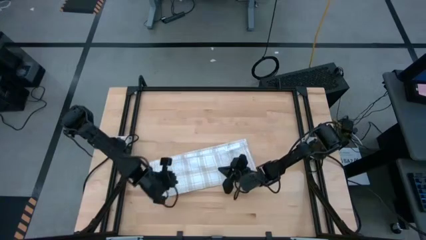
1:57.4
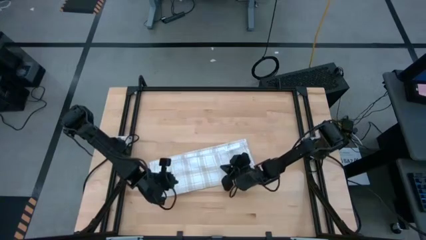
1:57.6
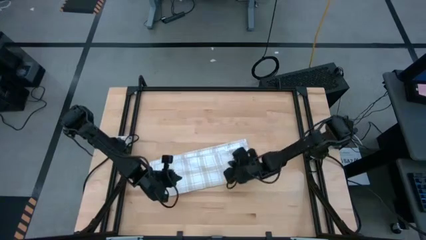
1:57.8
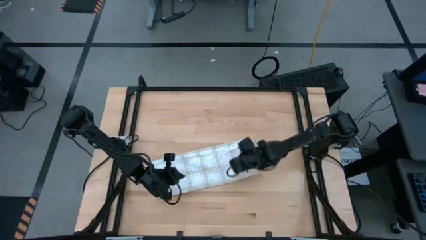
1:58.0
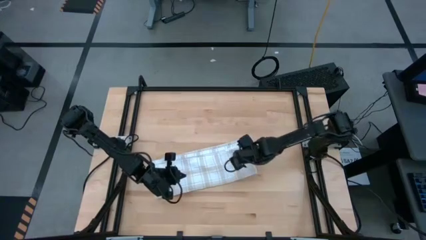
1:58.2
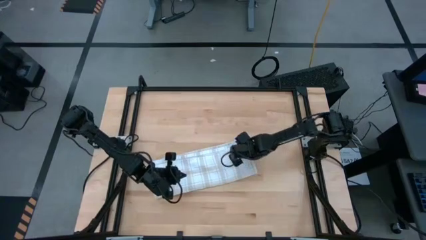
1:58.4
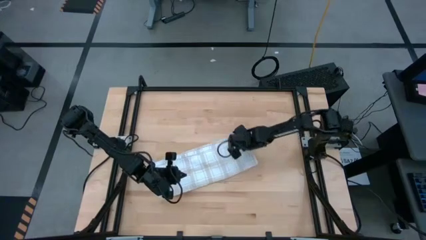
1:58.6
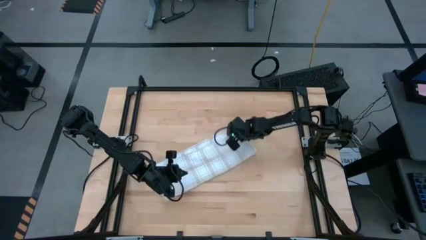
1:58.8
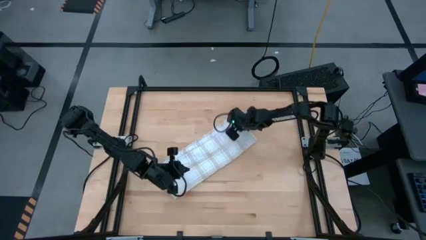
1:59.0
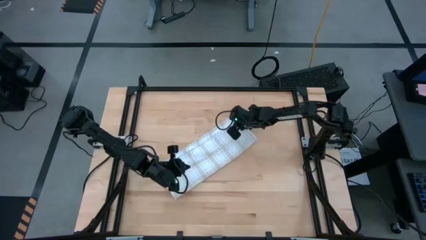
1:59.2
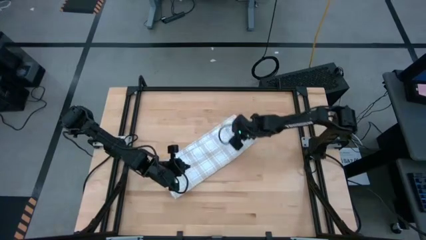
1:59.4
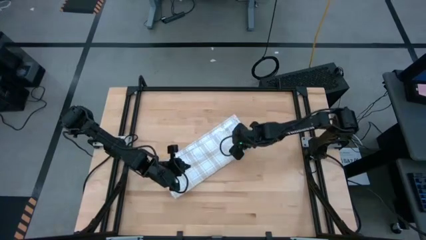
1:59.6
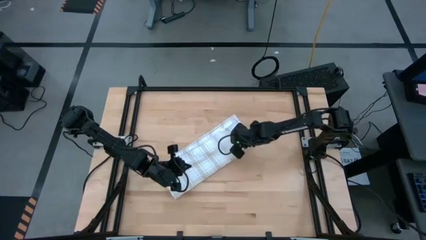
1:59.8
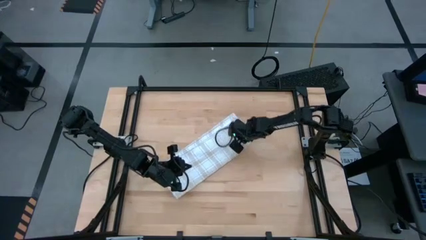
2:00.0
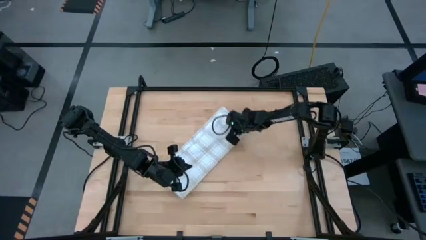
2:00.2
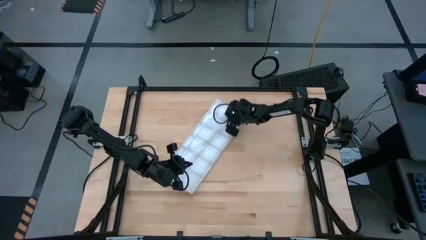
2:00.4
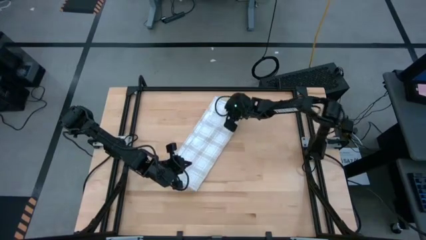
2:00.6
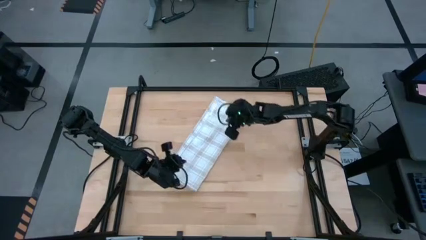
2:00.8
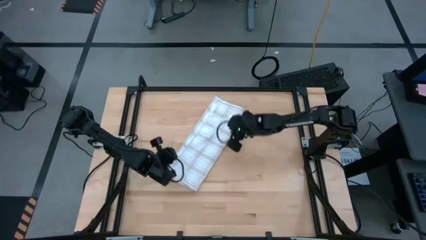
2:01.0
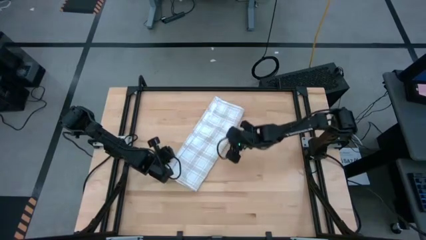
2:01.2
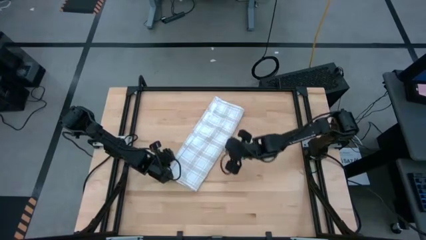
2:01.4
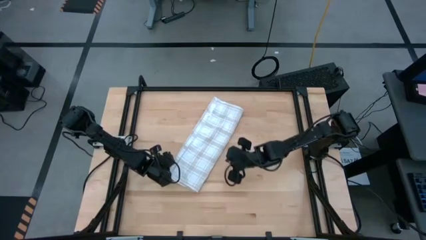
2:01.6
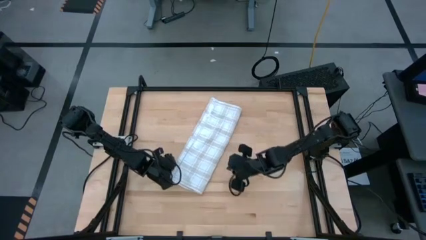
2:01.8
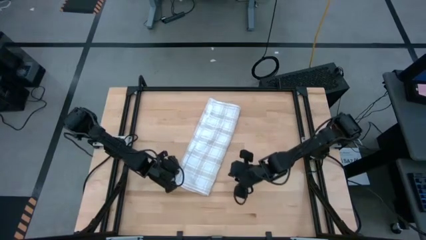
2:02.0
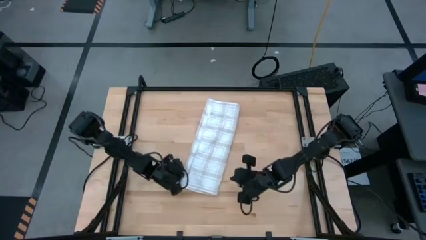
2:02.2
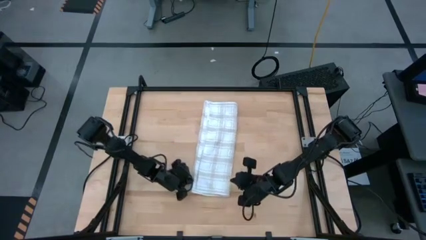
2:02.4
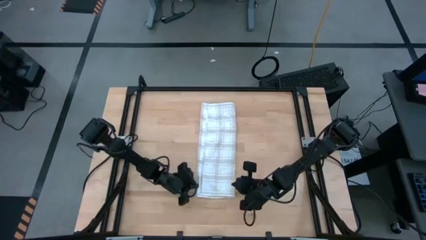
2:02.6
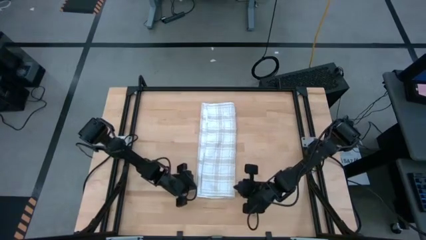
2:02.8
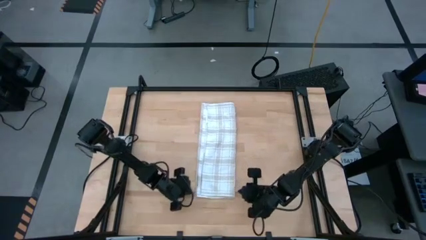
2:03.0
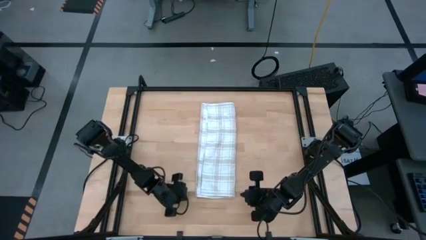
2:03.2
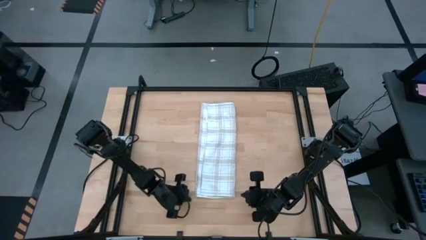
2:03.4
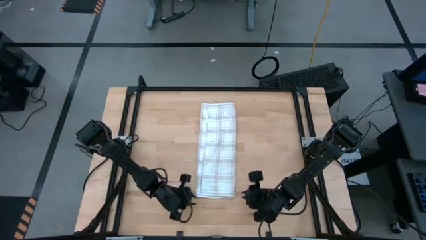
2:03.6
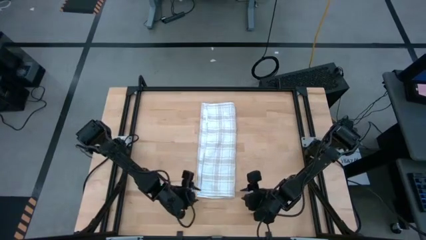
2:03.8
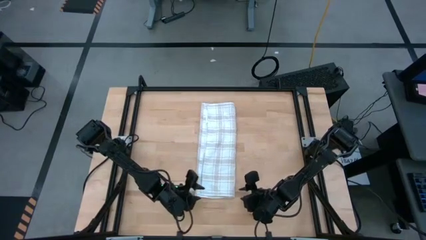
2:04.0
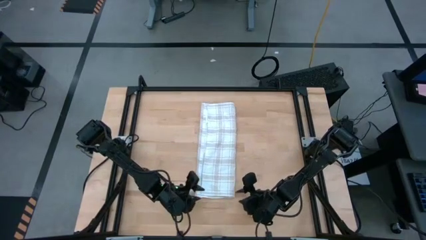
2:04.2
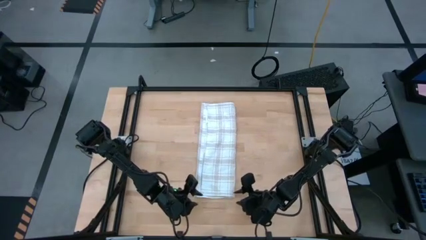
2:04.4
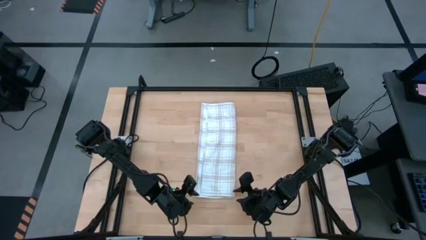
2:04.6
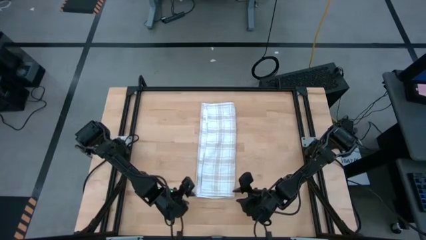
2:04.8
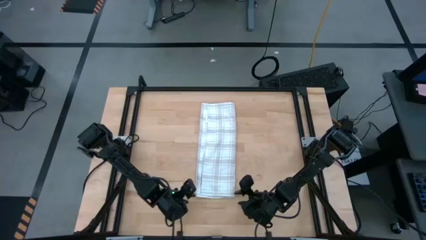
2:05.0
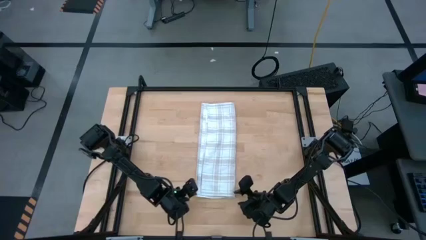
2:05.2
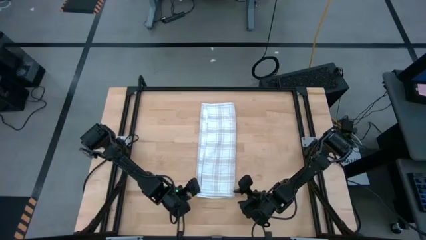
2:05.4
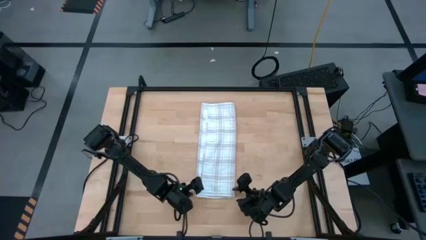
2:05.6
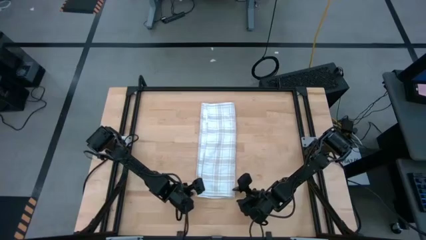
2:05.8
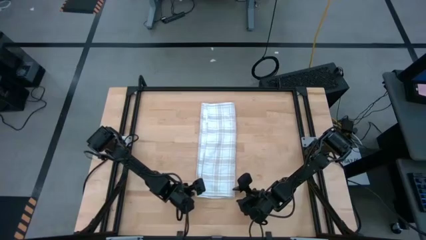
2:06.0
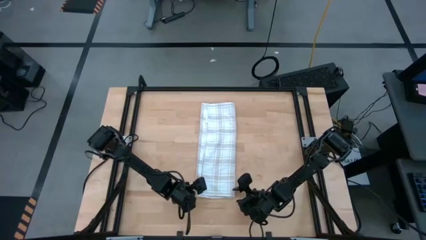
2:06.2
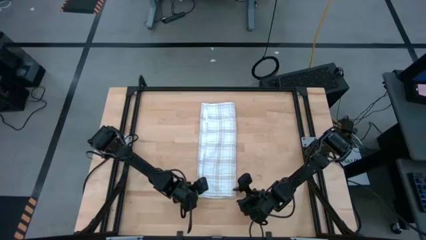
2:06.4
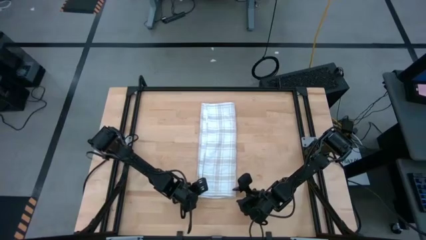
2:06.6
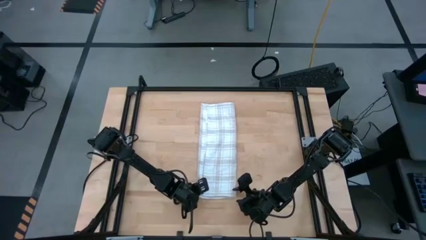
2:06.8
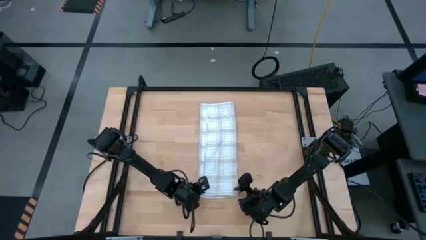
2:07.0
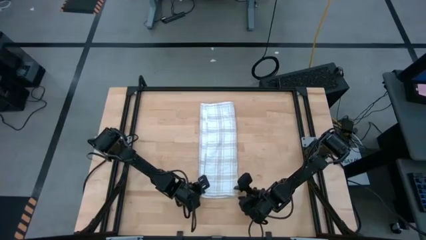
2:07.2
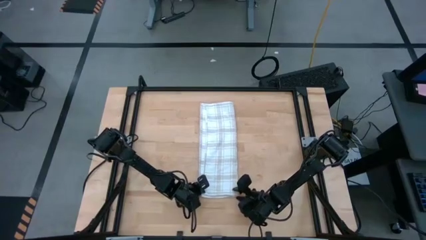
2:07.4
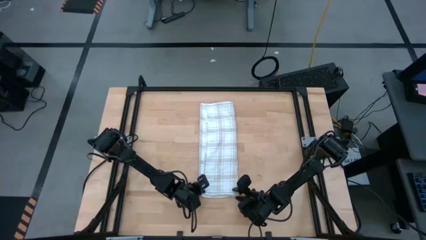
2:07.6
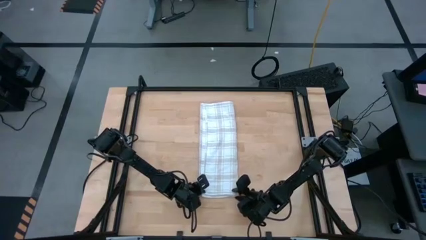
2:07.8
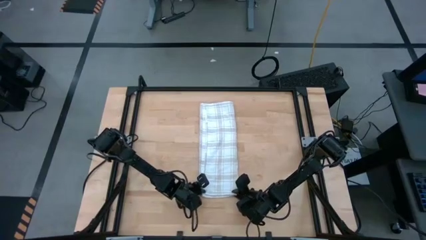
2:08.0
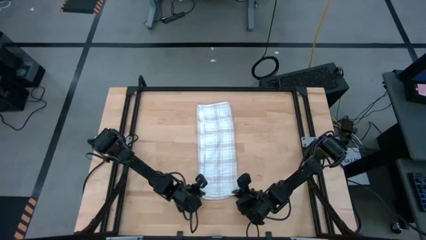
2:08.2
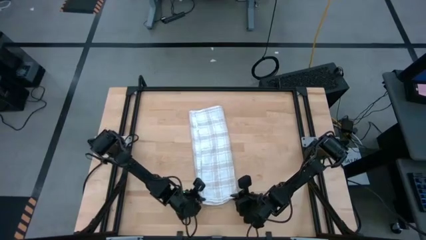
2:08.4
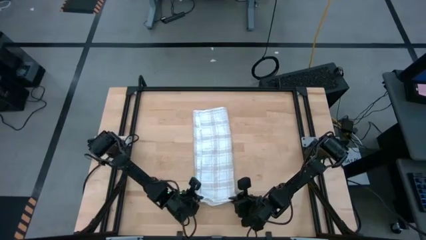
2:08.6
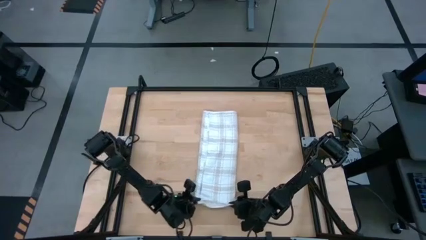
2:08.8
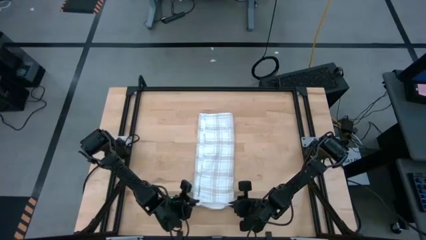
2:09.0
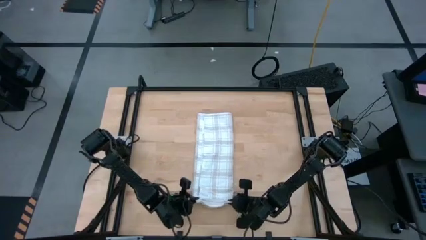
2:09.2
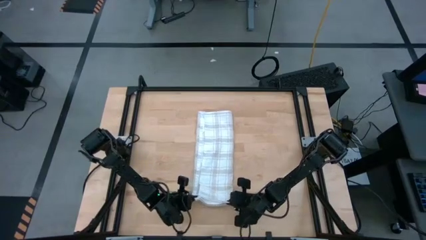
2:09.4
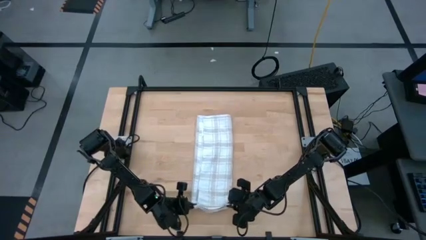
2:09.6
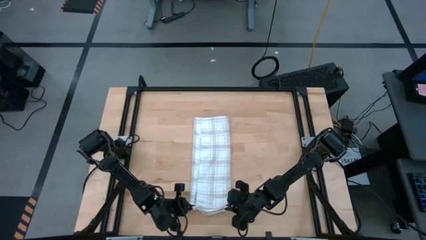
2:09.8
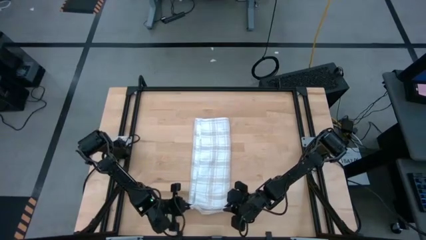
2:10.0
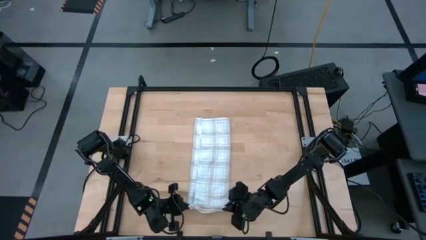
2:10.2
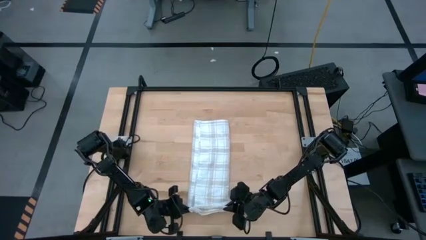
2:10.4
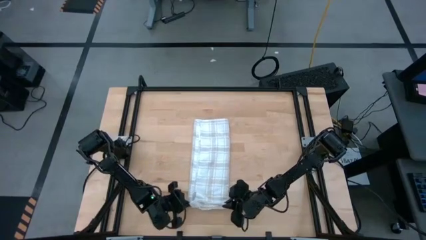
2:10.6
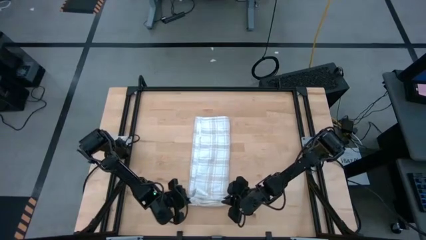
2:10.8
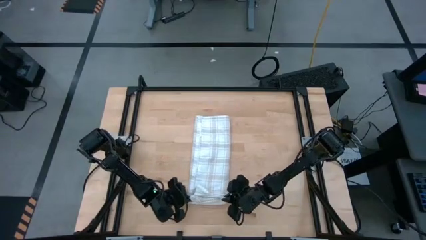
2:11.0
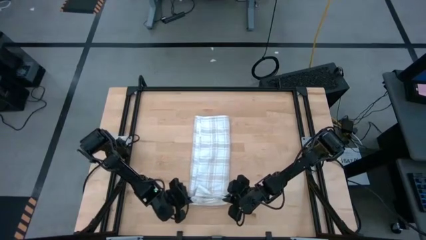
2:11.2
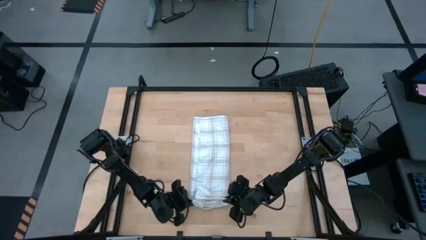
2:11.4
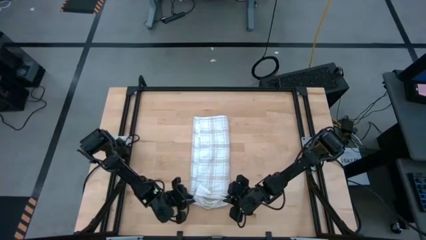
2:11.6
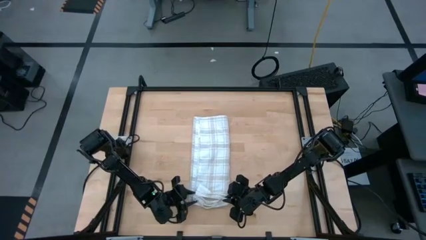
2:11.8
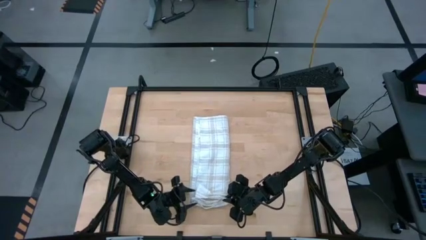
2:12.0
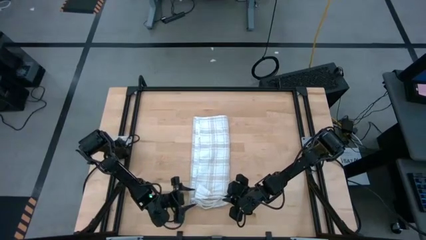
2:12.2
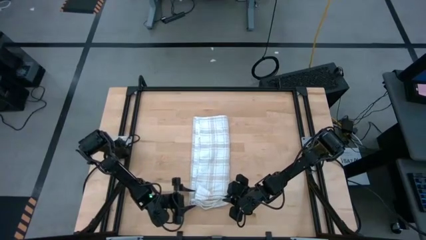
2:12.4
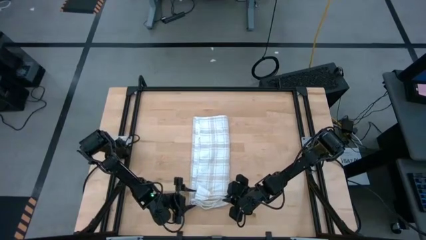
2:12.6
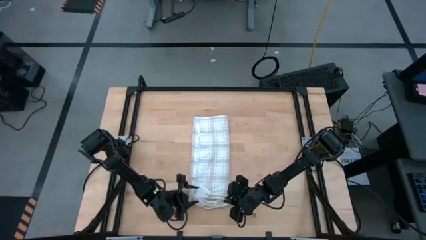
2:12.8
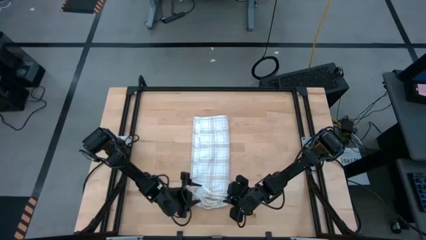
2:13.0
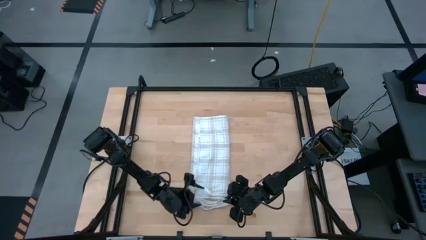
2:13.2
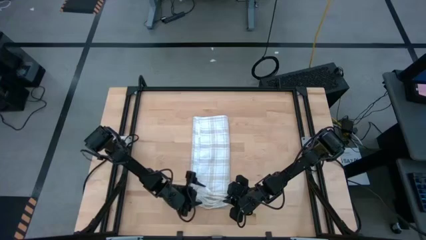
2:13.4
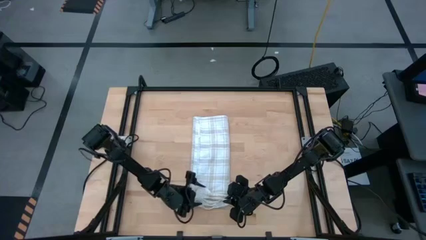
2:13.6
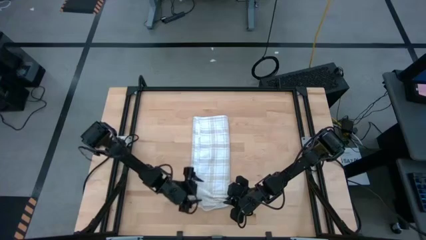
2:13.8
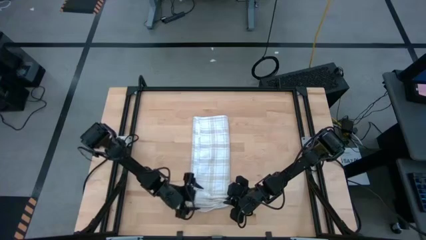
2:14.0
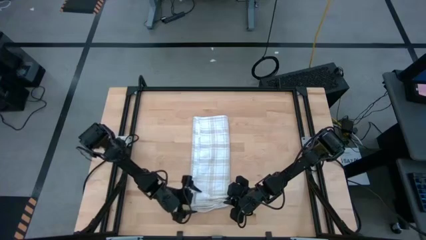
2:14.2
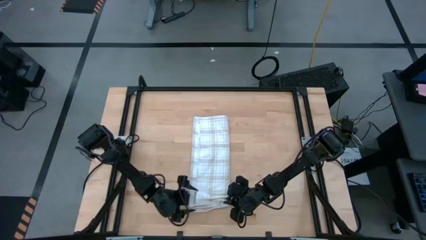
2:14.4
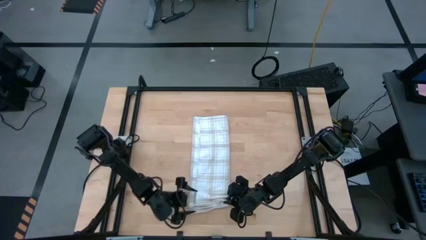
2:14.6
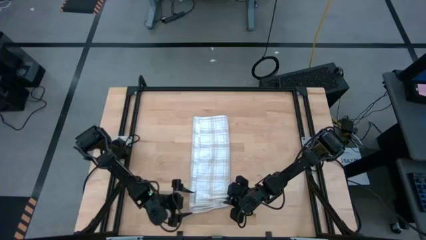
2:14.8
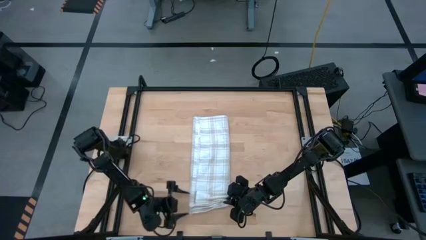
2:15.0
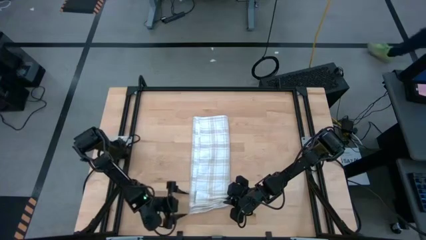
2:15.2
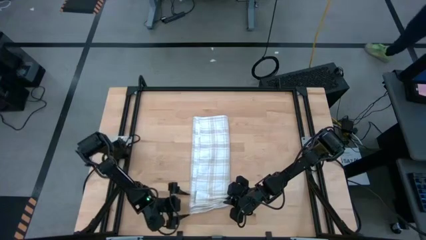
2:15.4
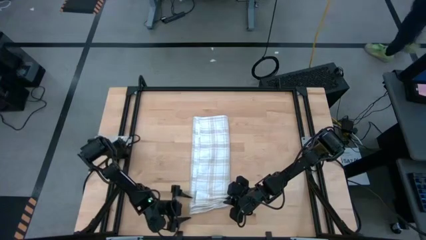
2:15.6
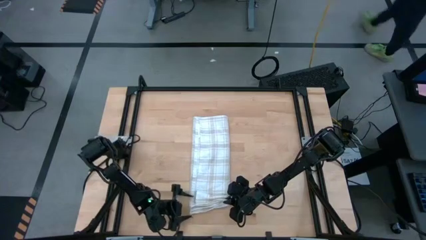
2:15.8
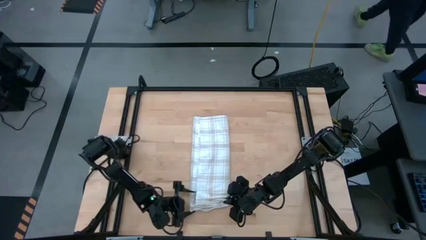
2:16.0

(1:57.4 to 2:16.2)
Task: Roll towel
Roll the white kitchen towel
